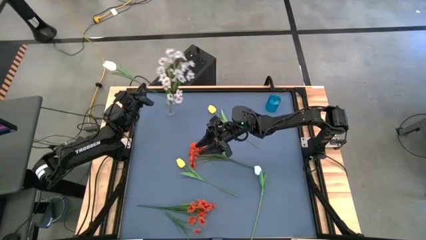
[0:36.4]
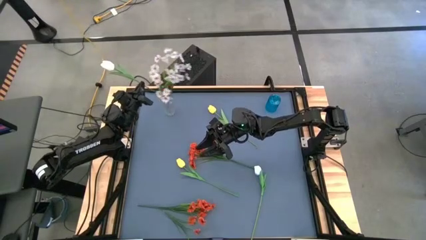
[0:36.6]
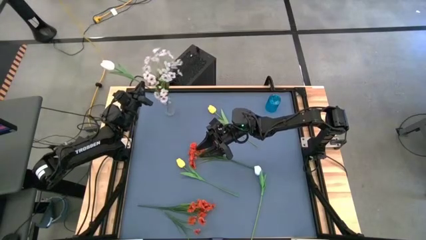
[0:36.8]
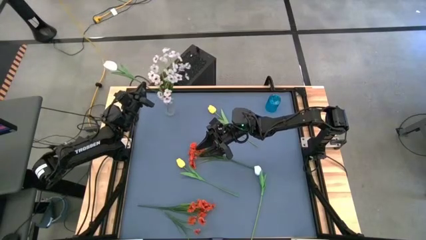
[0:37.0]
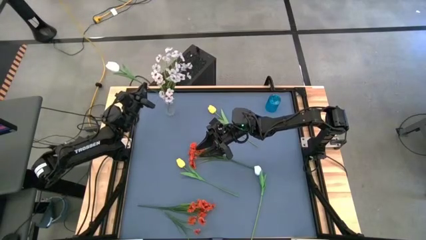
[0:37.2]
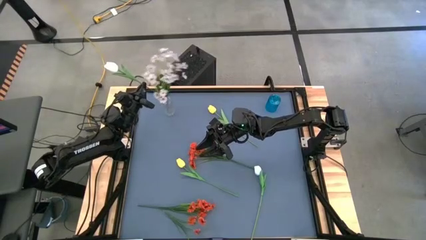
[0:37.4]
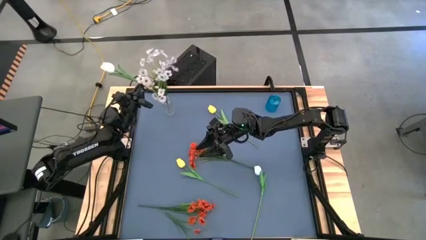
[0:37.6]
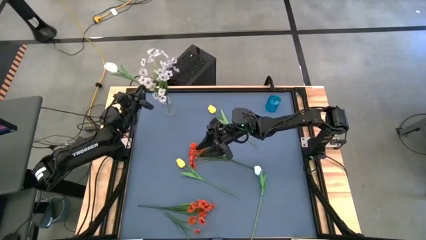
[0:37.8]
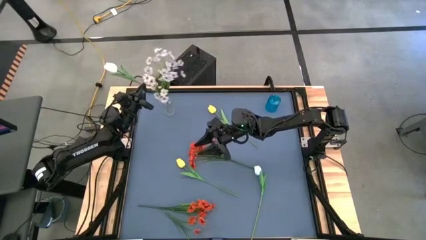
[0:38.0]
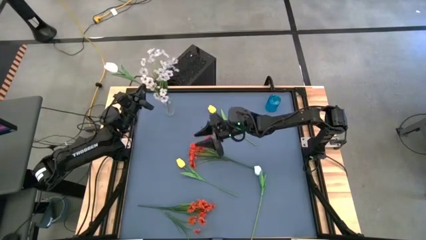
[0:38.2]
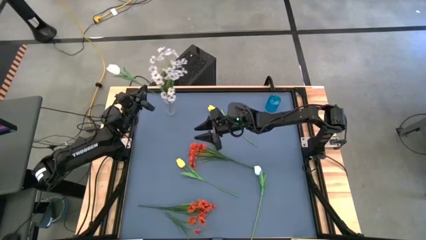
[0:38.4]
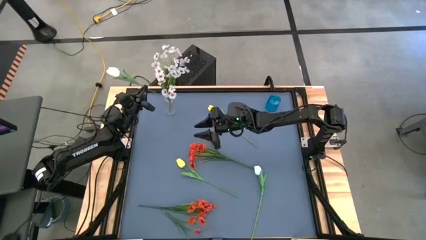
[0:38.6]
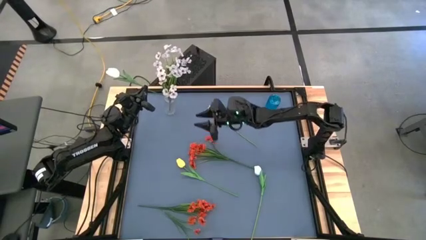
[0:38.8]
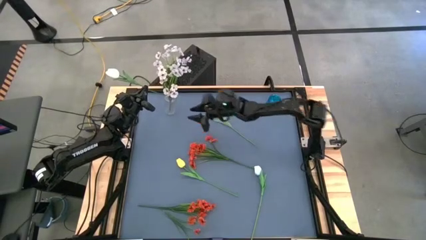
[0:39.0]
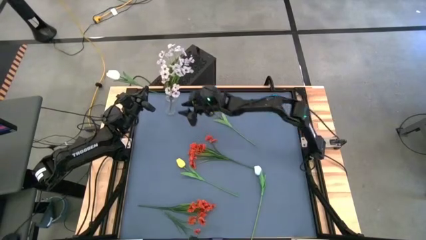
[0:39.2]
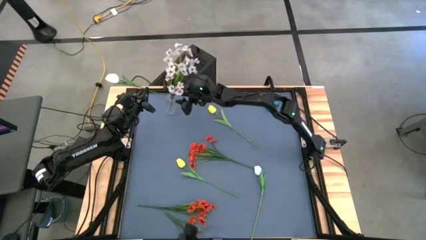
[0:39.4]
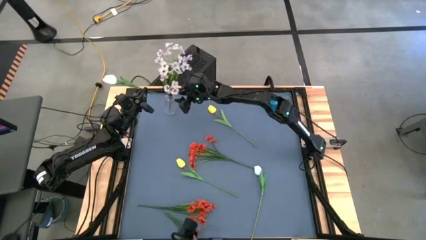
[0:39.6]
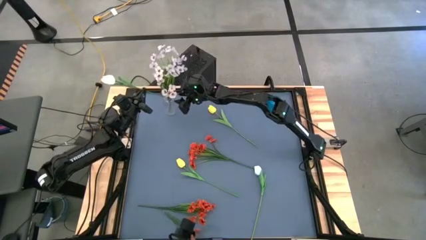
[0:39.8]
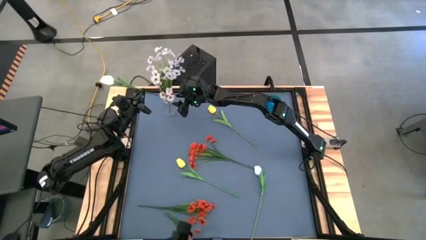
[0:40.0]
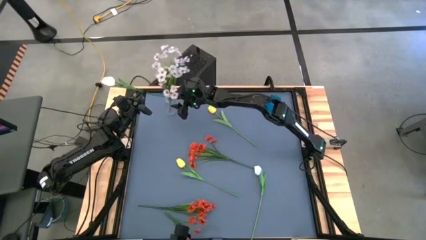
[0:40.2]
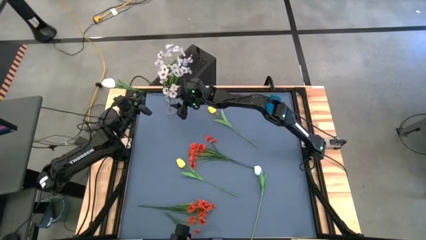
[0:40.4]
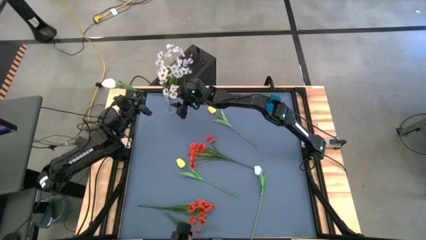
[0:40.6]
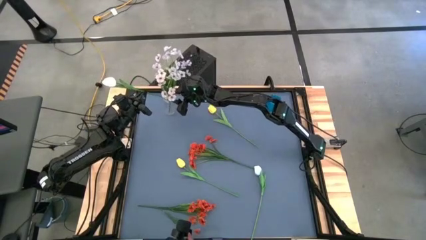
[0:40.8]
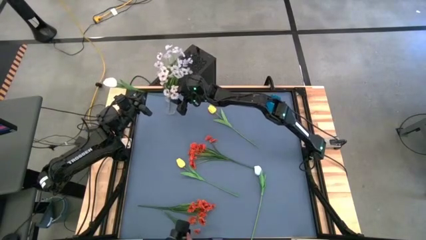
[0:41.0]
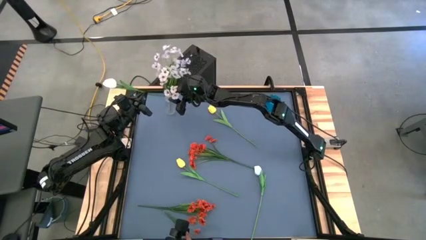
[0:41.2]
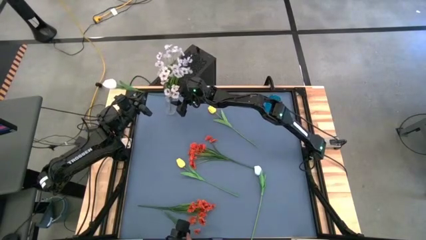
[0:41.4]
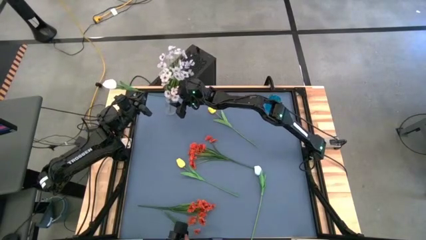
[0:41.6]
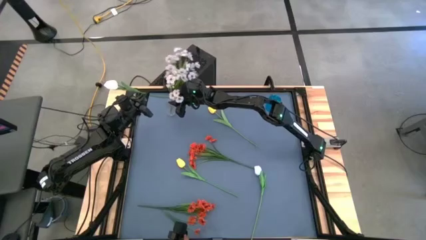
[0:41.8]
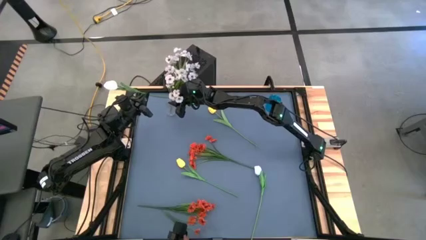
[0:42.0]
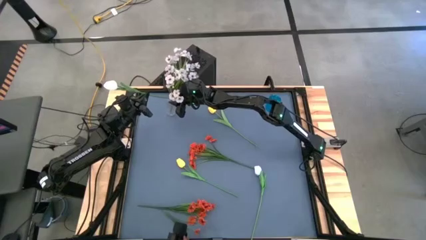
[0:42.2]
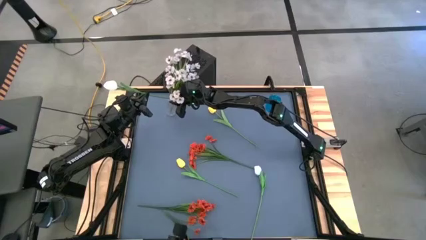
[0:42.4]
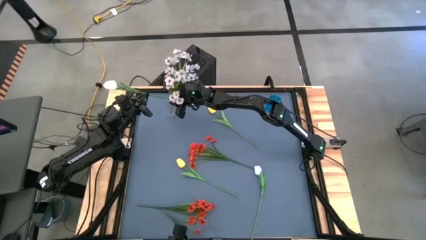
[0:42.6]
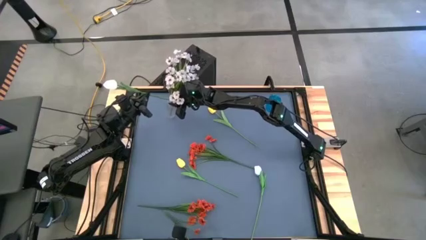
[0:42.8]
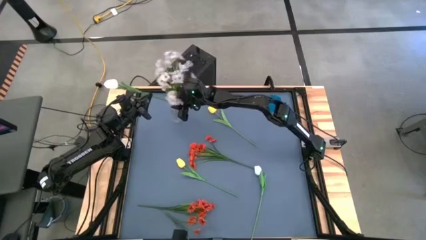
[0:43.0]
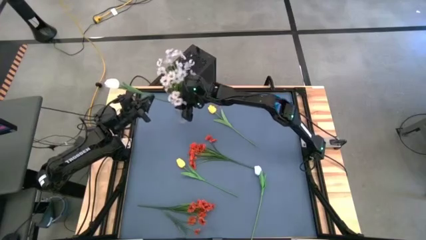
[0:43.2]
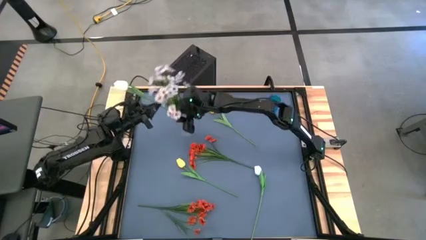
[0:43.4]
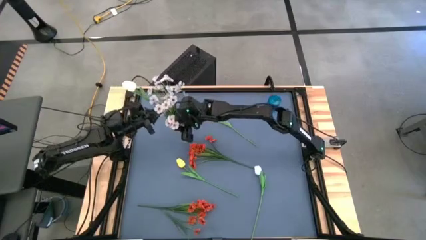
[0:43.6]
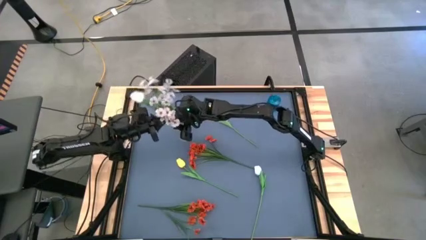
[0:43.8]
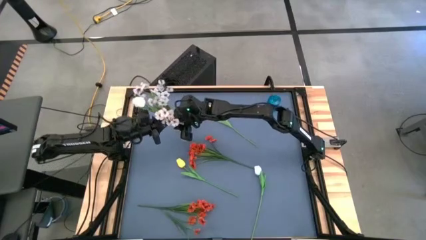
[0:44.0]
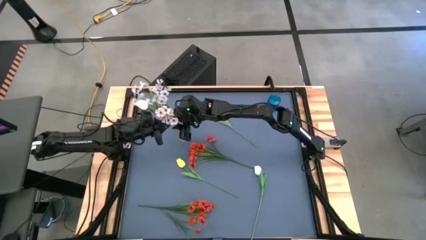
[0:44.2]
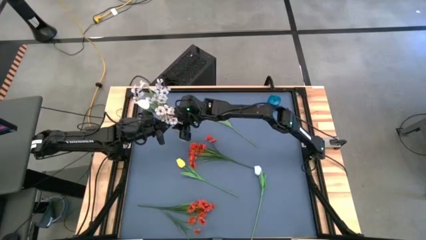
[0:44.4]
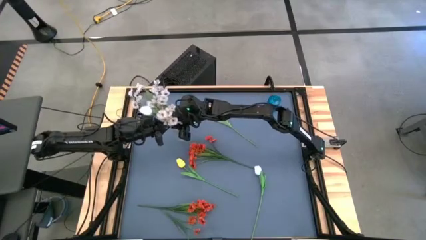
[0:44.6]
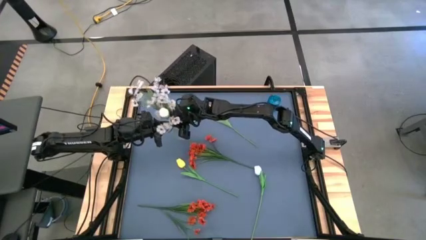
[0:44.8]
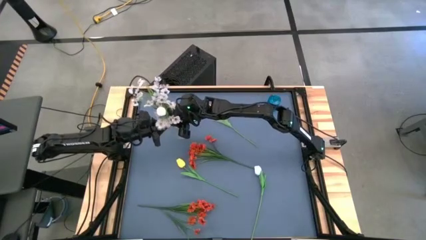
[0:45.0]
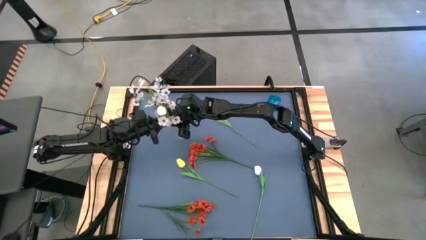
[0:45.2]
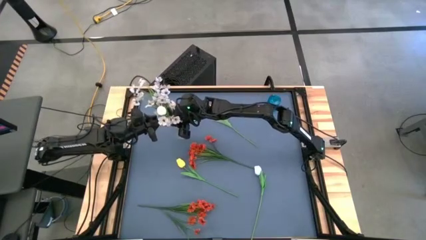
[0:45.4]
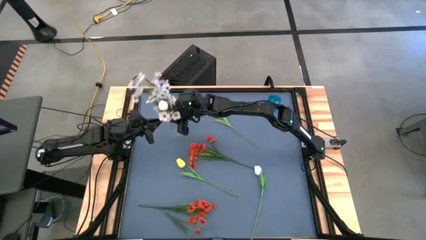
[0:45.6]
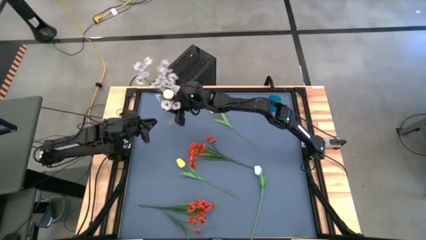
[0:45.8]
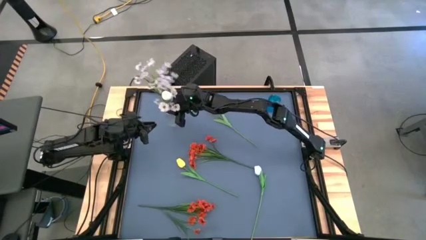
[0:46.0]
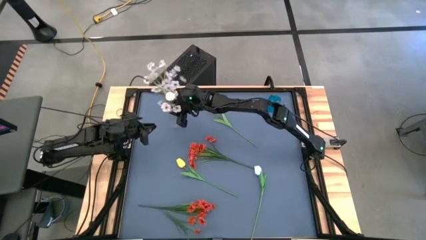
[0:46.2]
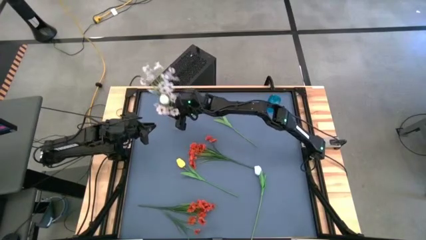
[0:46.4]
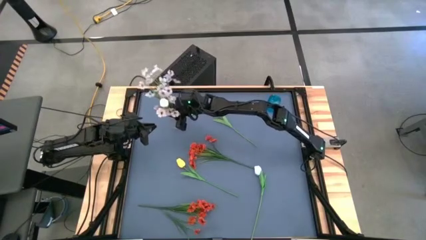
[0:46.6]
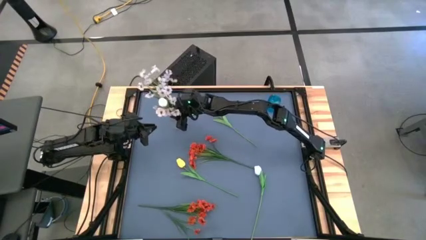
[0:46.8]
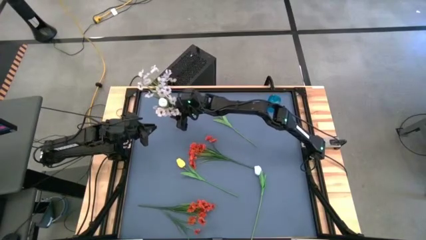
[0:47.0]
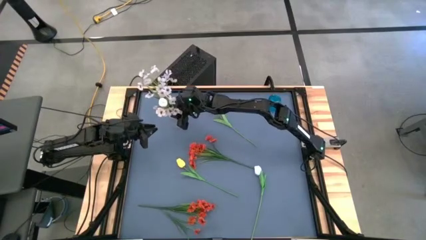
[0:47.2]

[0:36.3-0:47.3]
Task: Sort flowers into vase by color
Put the top white tulip flower into the transparent vase

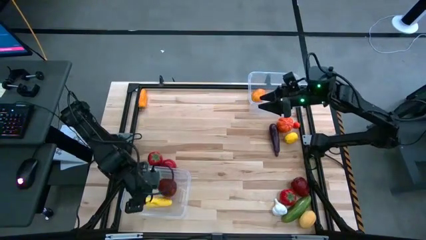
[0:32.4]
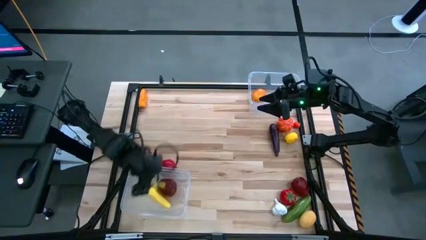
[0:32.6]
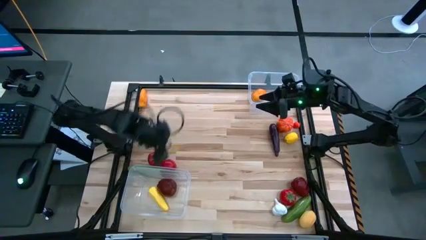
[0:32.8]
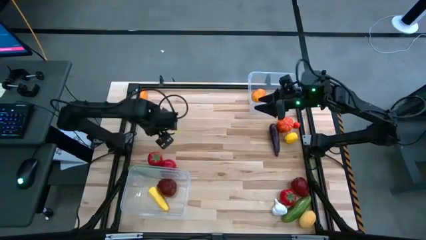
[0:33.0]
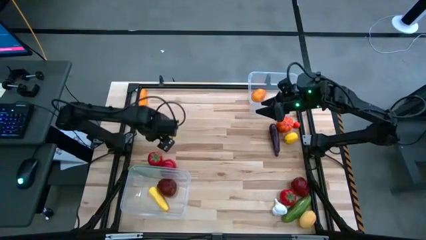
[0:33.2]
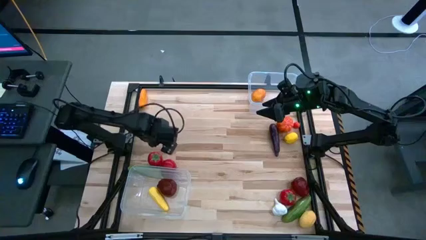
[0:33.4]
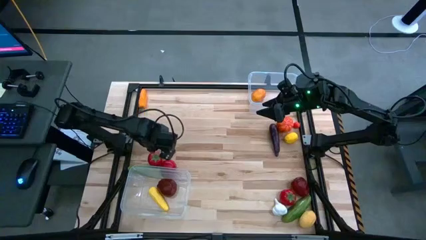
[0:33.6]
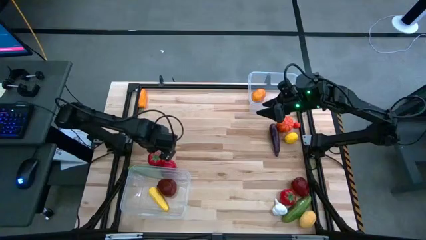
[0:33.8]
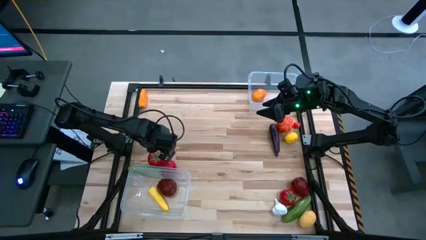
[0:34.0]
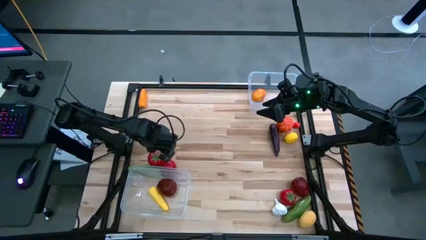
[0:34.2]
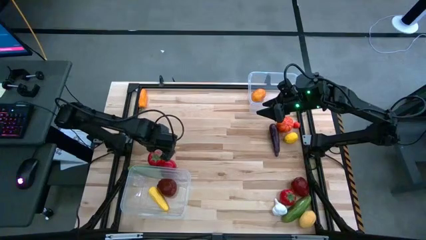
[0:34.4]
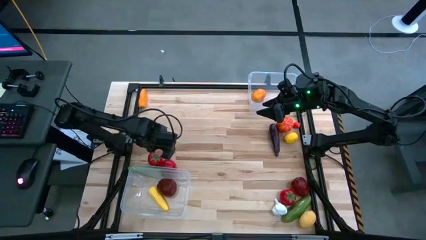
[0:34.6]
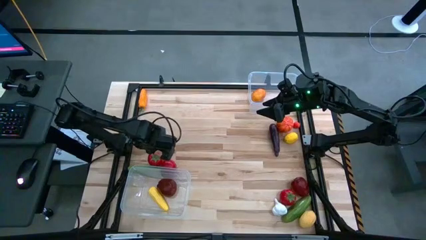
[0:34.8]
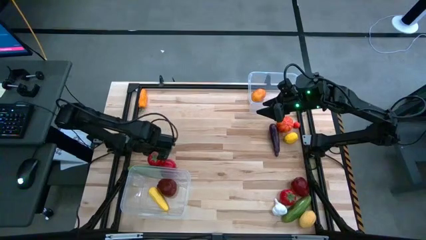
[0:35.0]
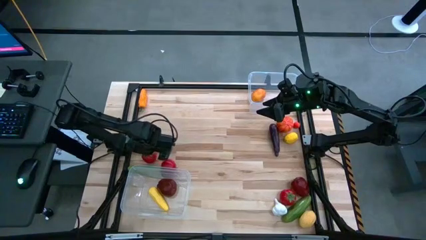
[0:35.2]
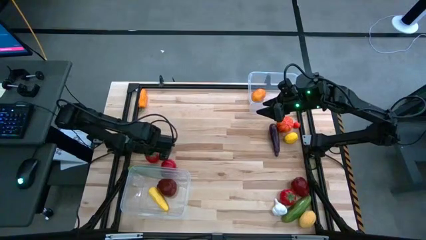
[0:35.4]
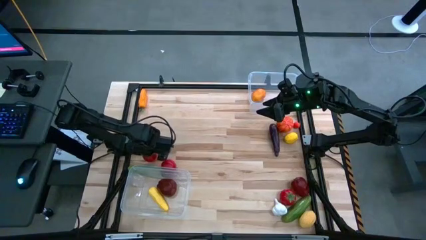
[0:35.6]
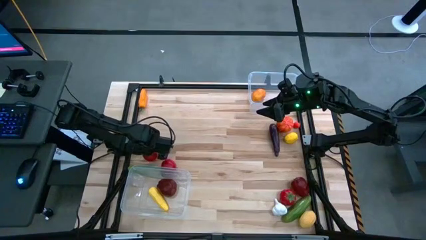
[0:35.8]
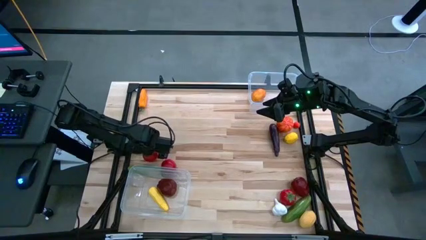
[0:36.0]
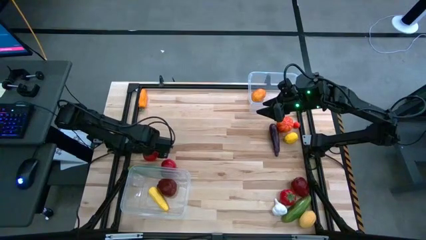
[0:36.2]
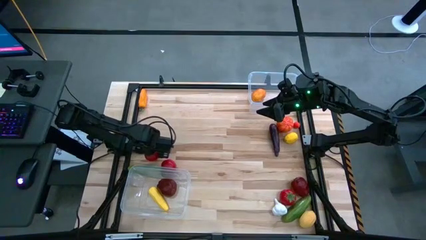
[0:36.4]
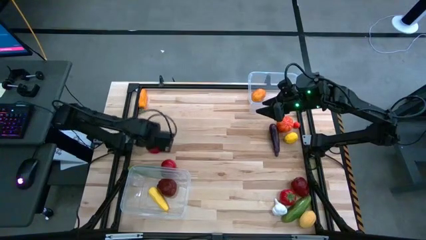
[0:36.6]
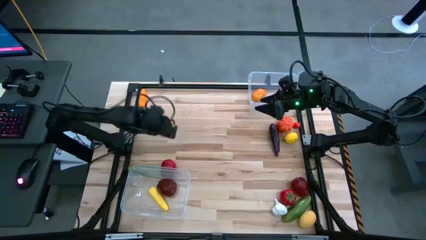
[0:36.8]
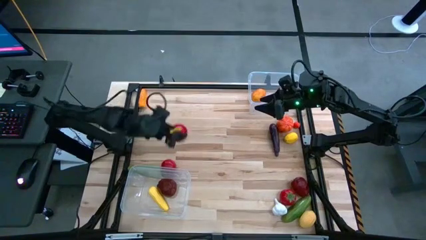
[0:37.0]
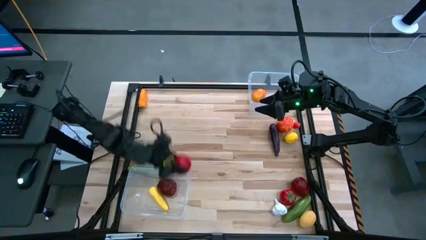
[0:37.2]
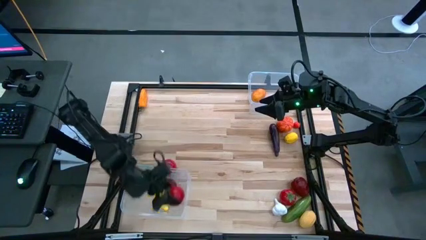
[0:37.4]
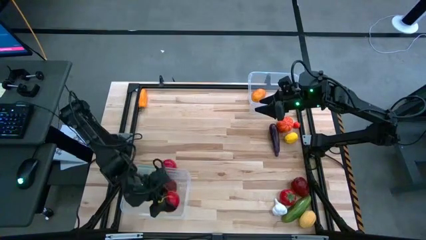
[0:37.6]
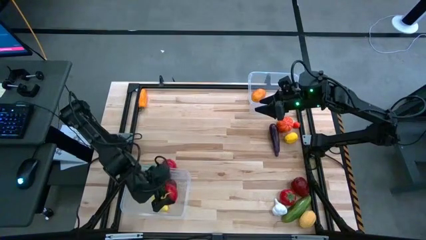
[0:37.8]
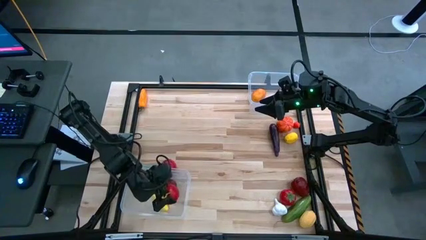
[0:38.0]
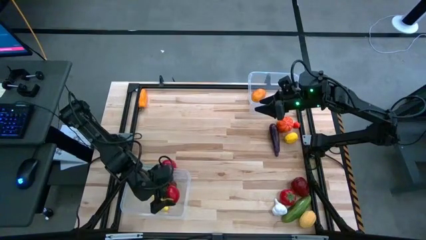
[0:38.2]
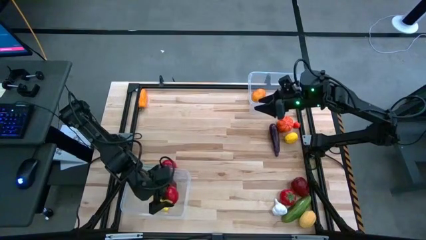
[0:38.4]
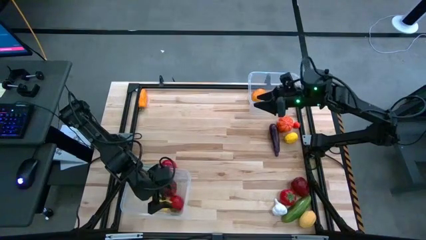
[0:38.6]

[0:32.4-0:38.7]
Task: Sort produce into baskets
Put the left red tomato into the bottom transparent bin
